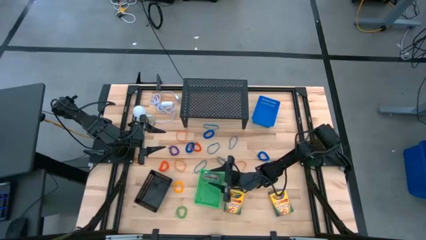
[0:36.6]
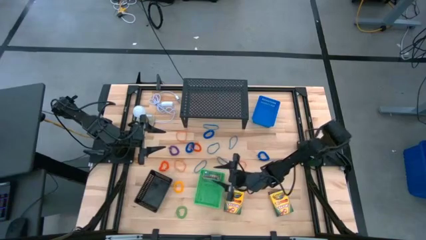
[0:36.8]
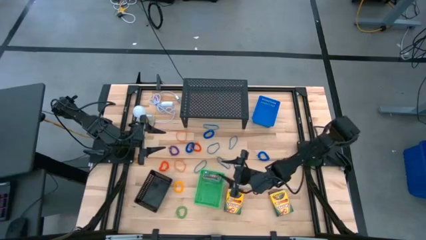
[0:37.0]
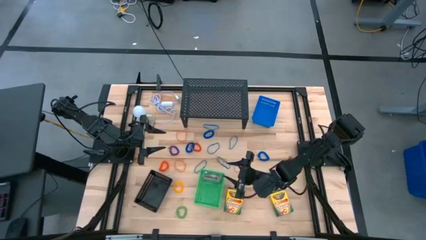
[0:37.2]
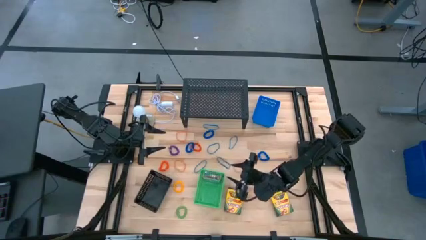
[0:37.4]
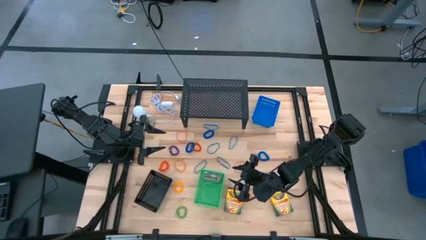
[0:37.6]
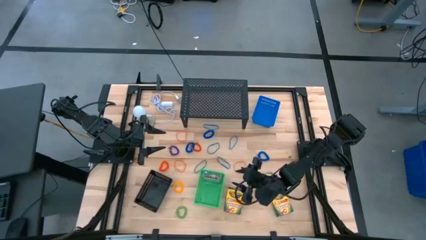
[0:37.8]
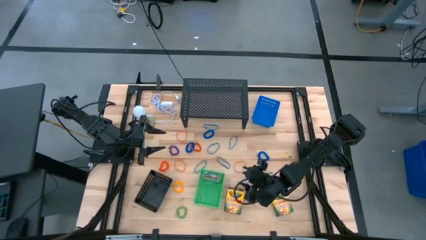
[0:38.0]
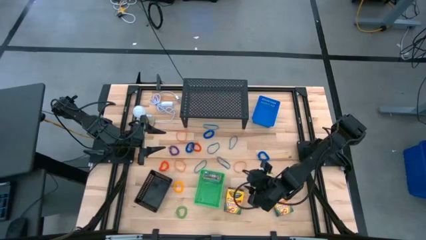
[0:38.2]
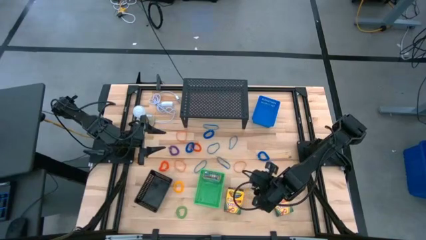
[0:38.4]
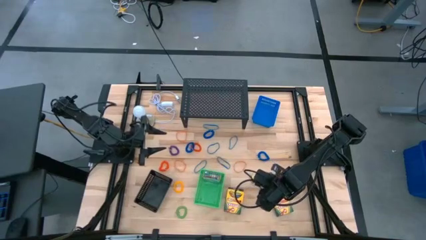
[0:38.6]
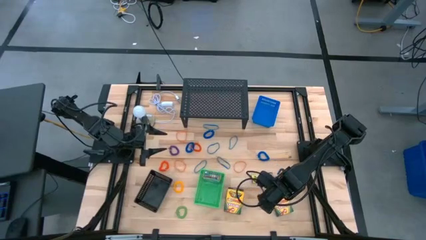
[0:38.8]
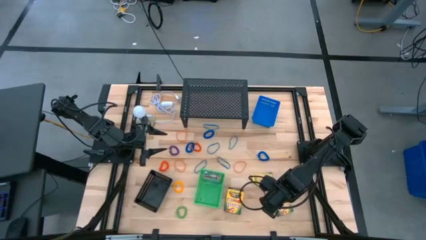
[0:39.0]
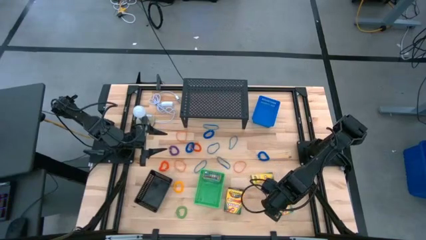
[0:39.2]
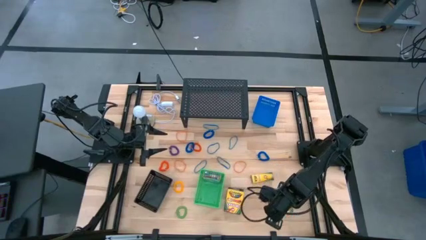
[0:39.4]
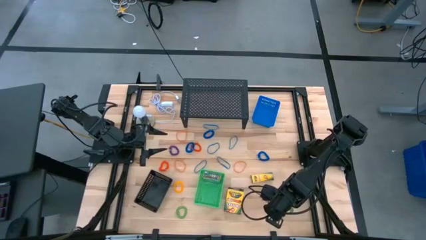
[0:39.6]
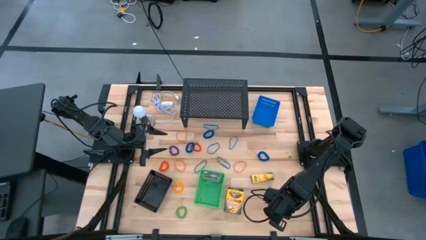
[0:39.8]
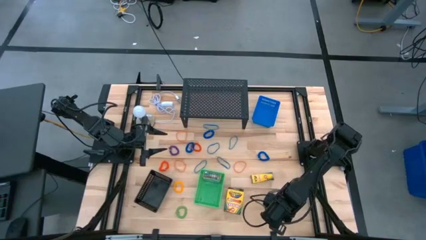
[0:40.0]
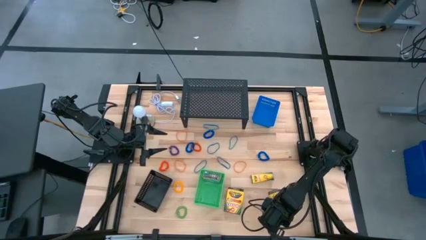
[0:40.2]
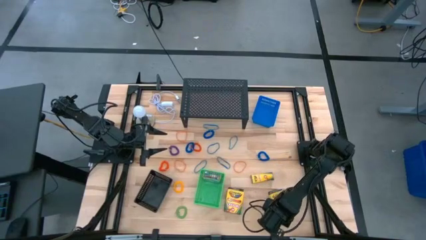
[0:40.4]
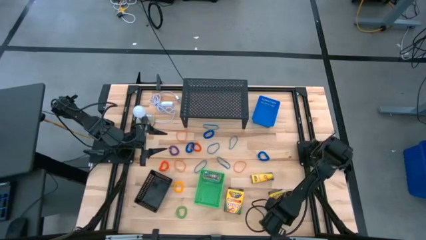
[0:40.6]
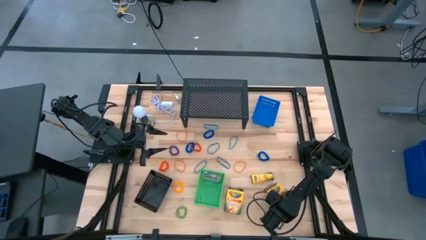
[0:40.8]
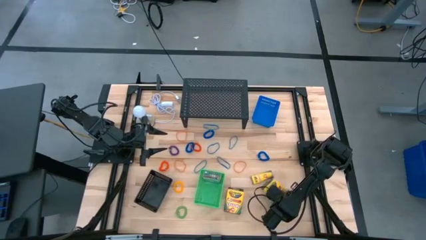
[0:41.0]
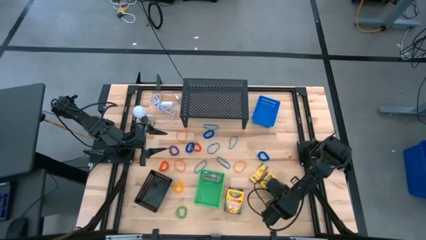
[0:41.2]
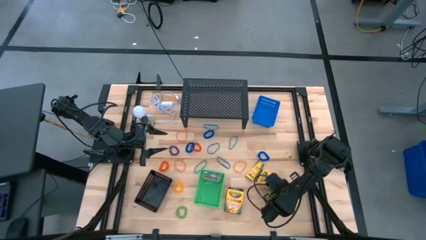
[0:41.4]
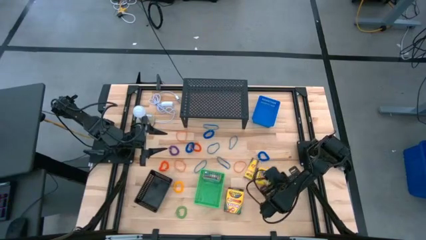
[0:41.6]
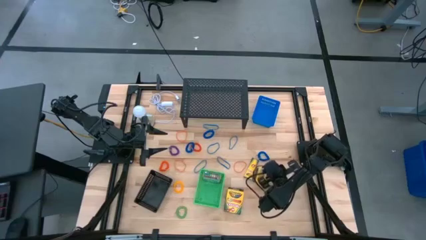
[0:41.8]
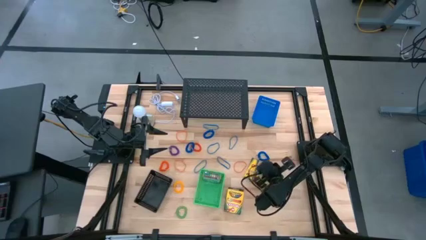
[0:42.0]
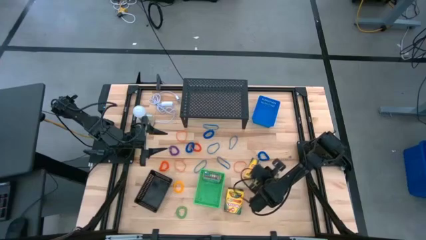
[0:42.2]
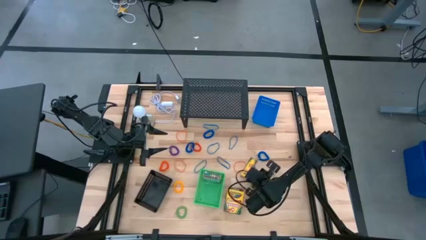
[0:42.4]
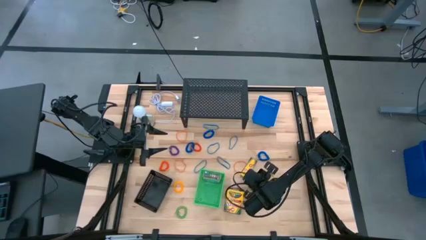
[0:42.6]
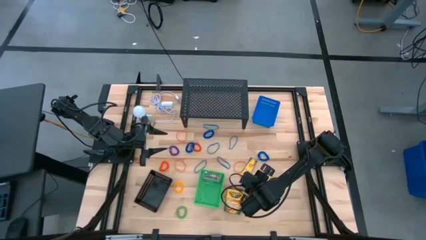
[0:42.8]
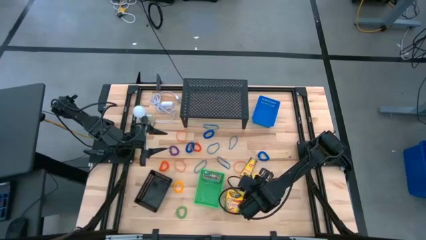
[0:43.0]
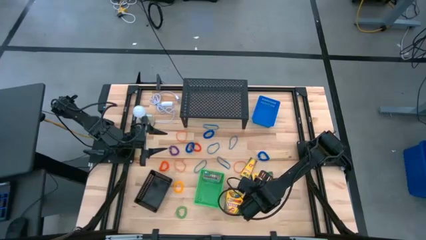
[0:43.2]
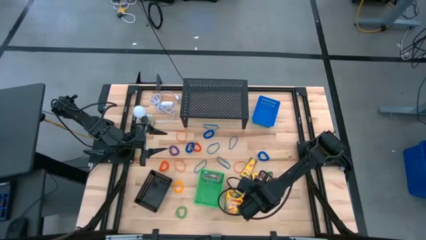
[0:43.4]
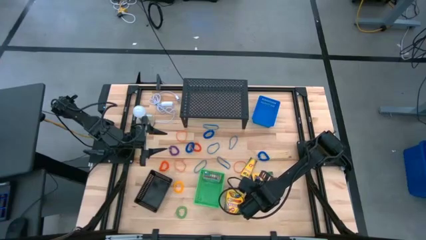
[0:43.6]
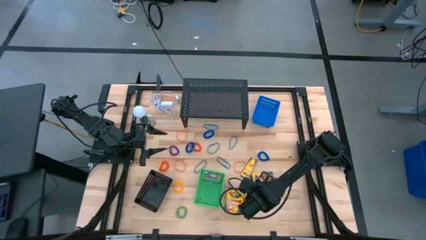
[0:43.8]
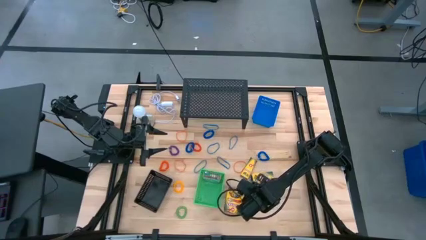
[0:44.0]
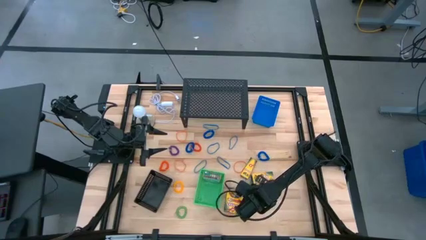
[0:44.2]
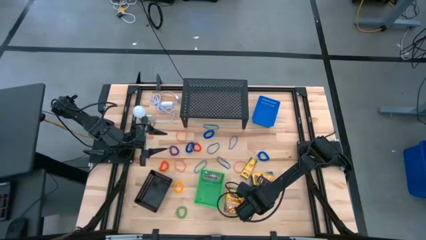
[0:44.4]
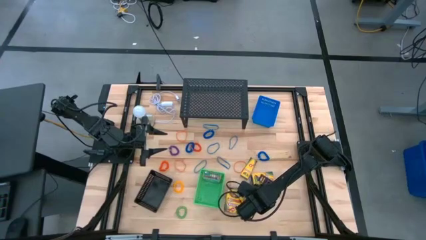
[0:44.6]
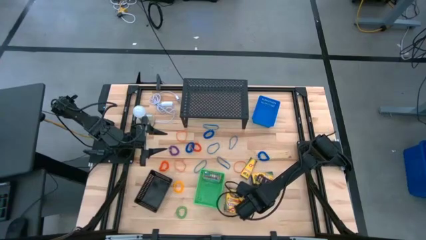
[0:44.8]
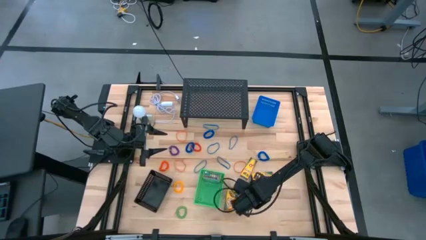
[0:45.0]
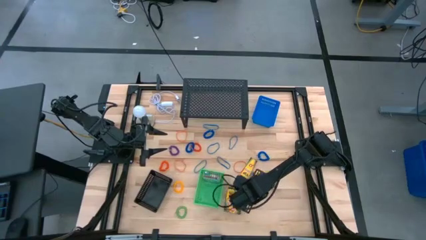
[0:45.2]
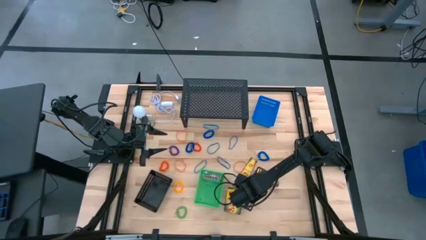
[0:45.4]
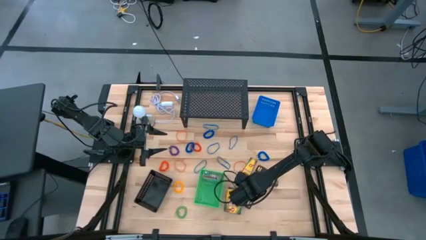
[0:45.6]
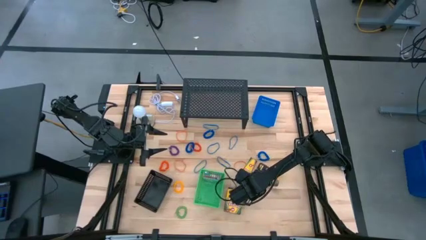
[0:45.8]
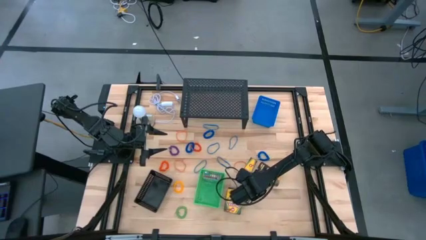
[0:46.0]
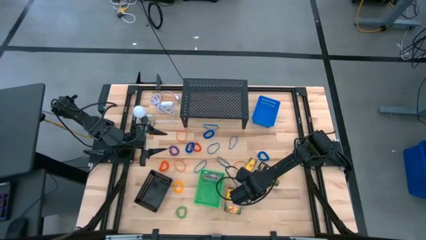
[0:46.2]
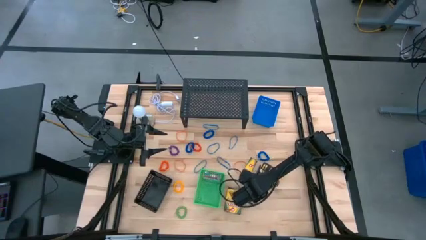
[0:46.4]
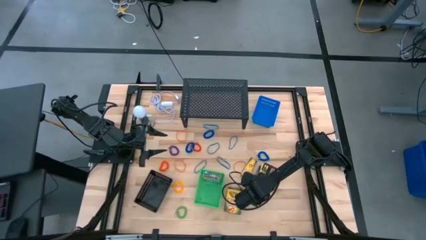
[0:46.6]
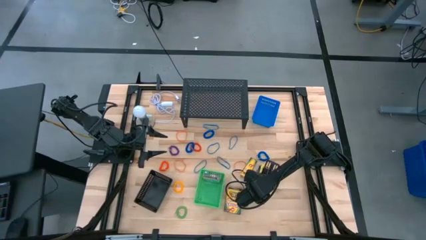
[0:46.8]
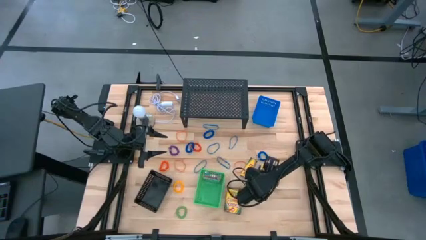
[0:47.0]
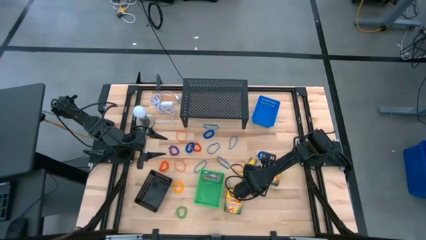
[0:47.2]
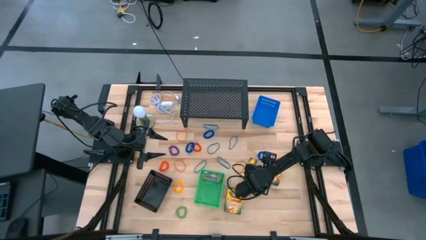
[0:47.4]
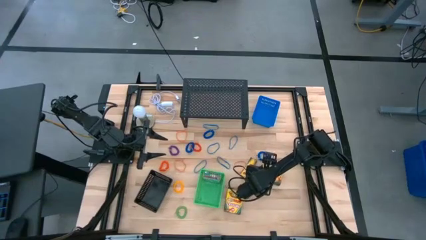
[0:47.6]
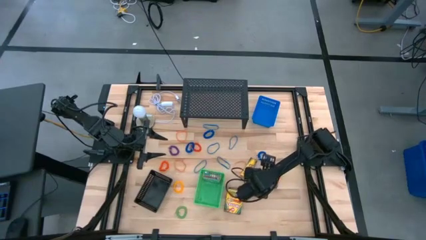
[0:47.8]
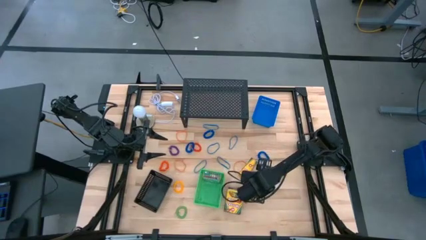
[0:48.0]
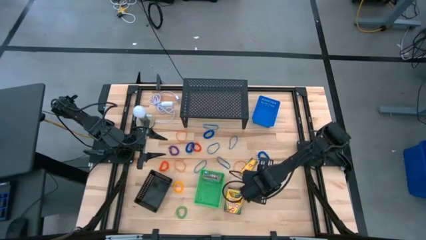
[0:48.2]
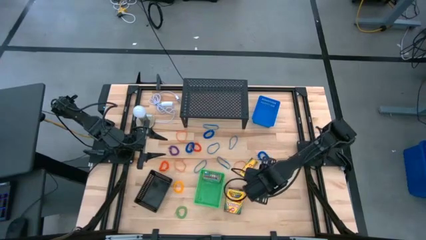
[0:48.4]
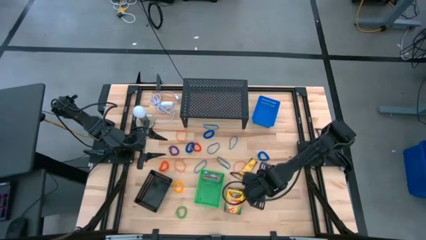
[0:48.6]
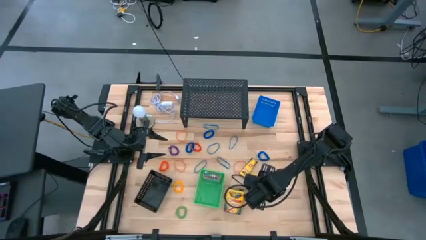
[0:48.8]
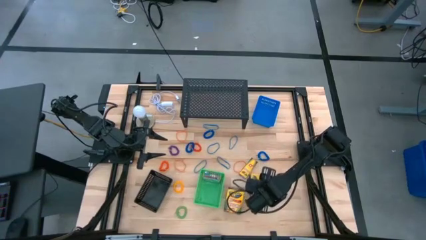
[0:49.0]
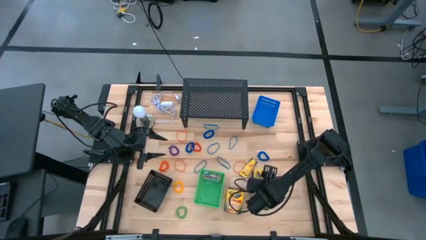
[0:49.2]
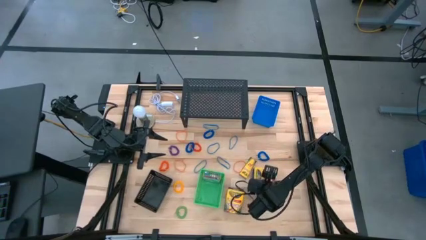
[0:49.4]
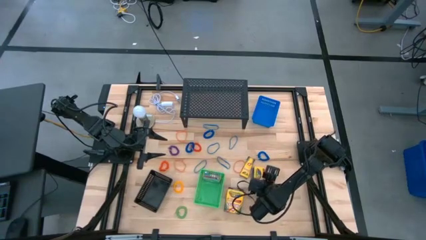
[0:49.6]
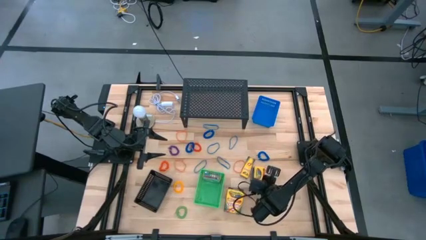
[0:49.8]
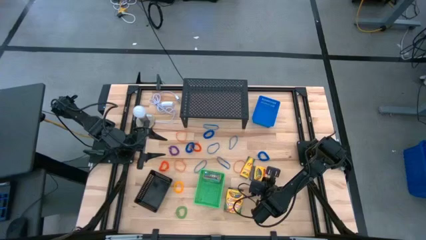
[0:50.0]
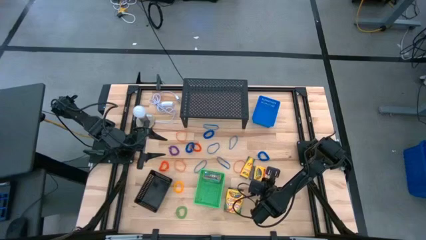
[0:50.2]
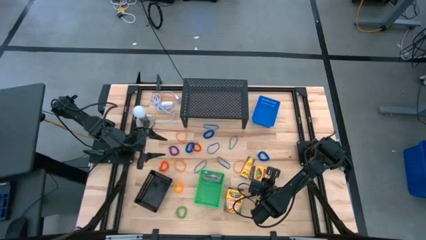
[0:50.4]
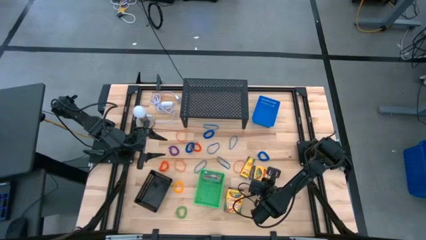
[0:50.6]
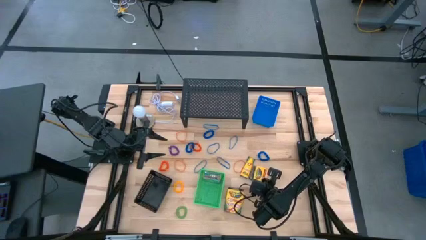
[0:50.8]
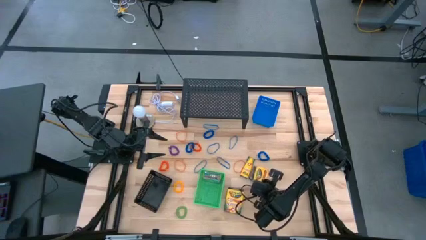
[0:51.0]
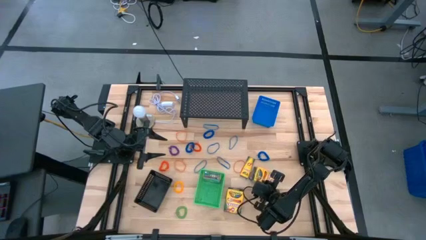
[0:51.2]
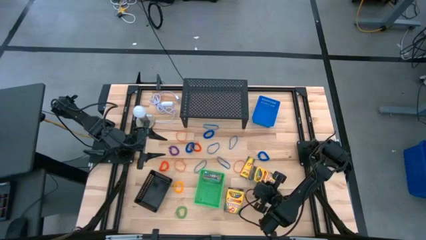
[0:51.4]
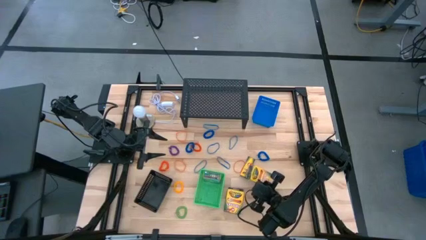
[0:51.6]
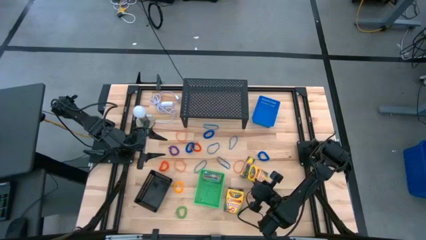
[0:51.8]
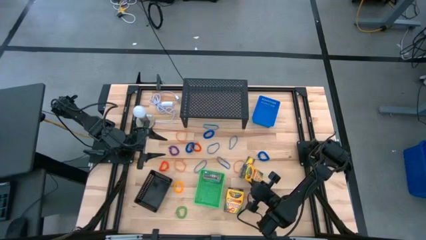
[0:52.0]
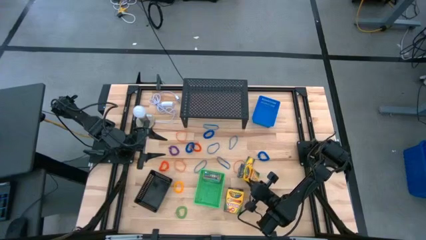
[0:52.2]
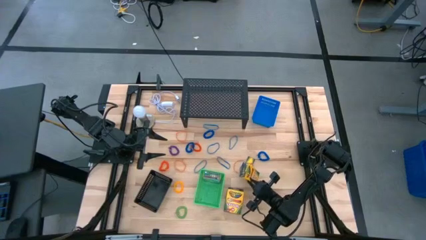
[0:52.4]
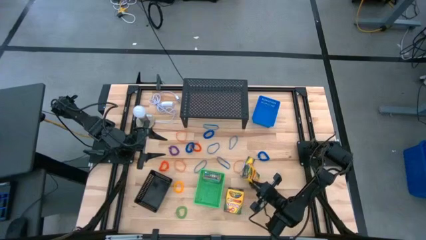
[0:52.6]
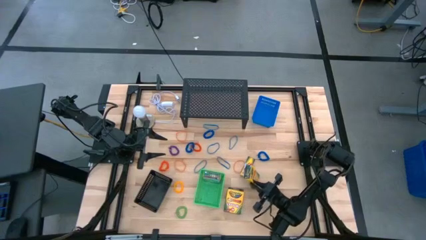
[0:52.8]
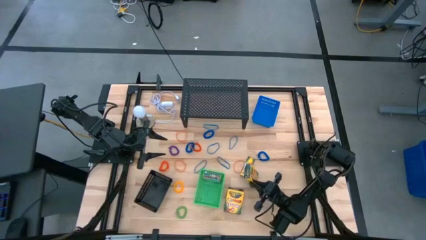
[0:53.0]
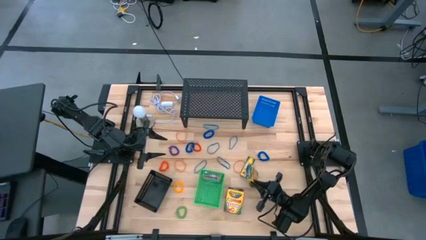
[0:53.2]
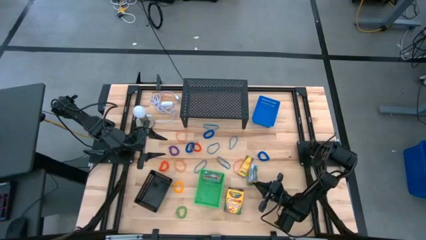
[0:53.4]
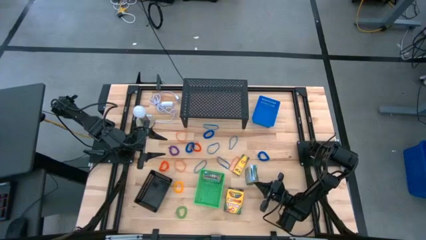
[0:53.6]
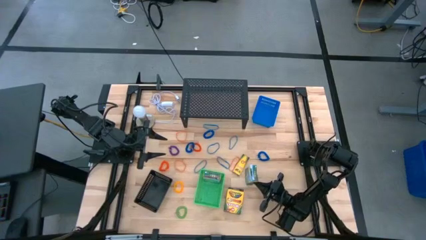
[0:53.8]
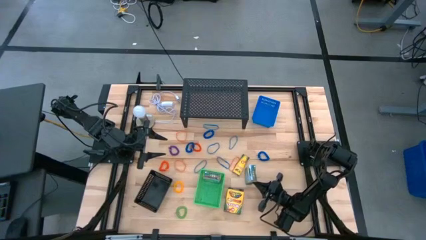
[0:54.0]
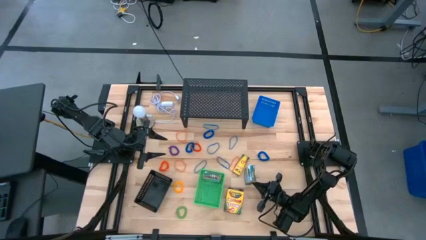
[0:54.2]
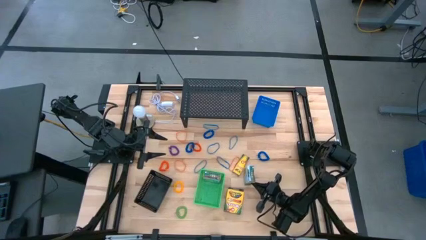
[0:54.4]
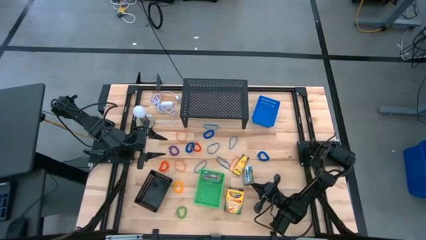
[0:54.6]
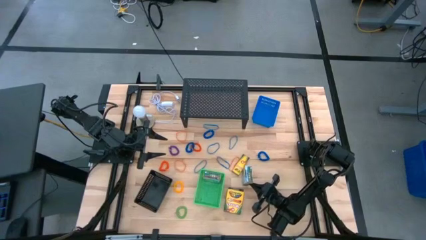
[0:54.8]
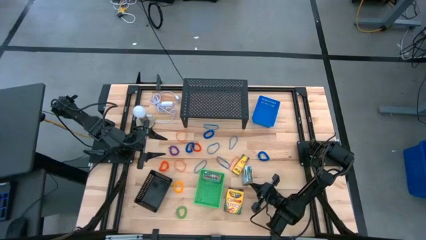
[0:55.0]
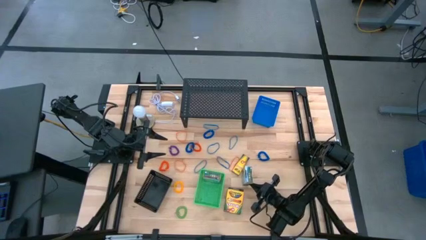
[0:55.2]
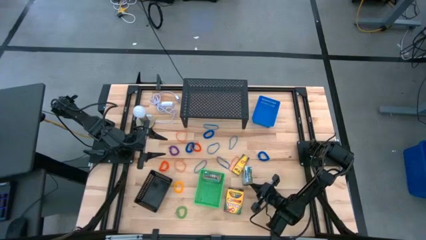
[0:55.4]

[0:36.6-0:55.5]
Task: Pick & Place Office Desk Supplies
Put the crayon box into the green bin
